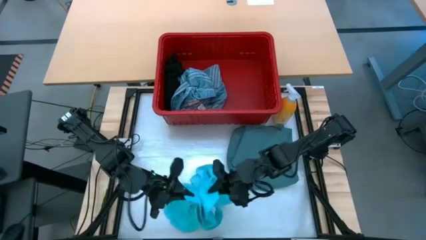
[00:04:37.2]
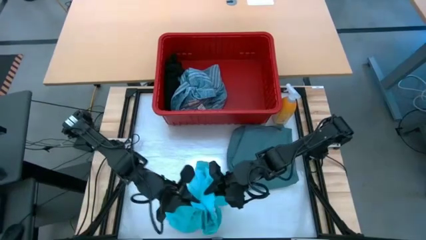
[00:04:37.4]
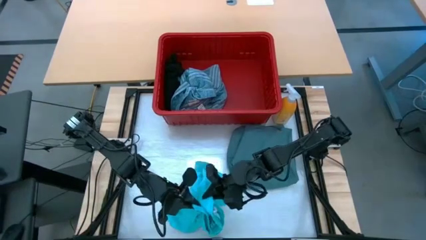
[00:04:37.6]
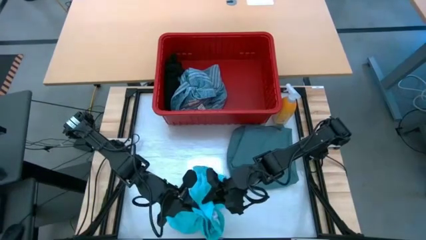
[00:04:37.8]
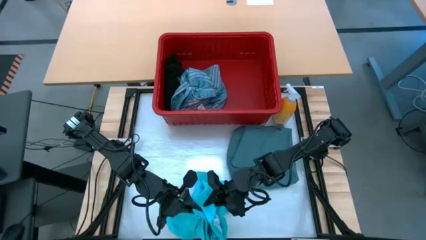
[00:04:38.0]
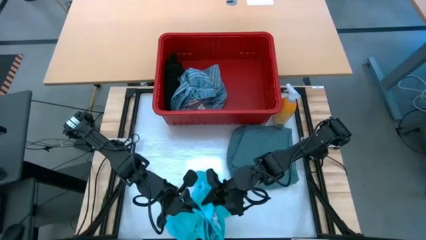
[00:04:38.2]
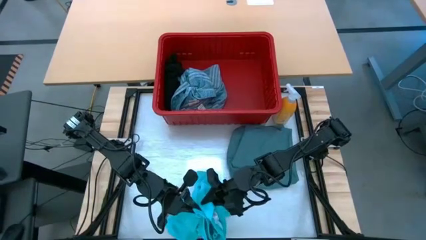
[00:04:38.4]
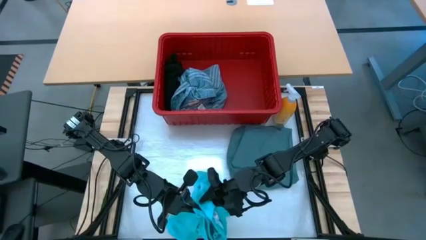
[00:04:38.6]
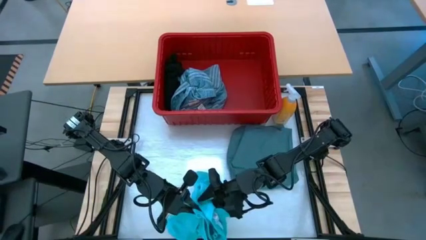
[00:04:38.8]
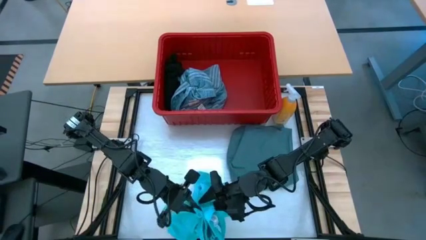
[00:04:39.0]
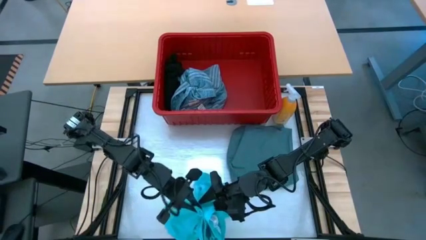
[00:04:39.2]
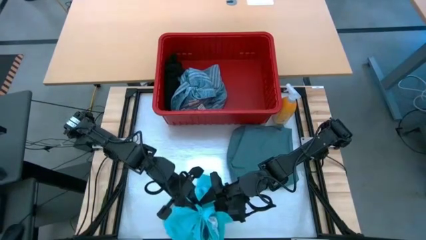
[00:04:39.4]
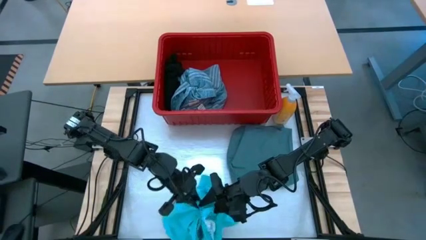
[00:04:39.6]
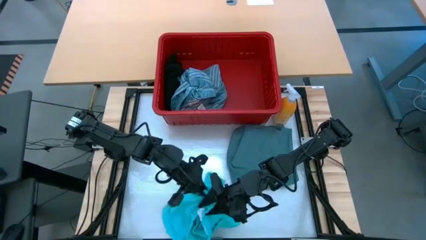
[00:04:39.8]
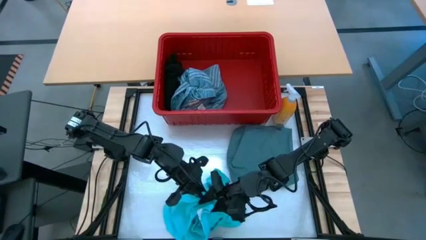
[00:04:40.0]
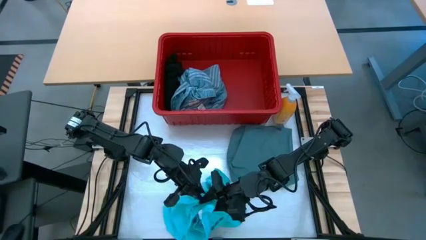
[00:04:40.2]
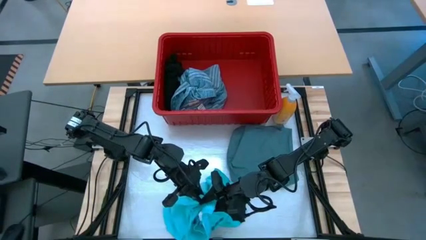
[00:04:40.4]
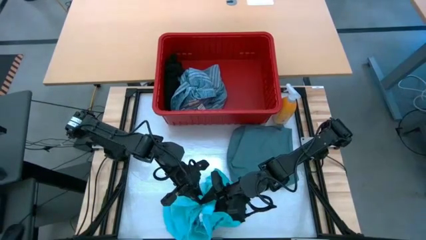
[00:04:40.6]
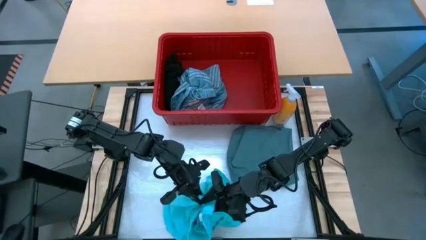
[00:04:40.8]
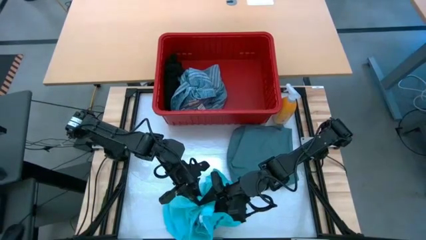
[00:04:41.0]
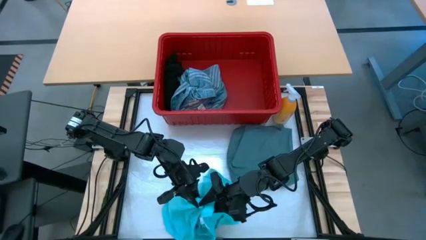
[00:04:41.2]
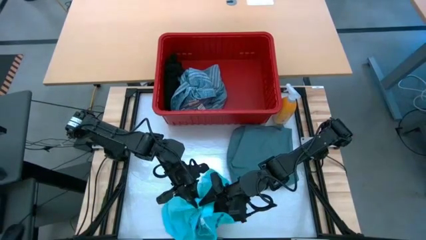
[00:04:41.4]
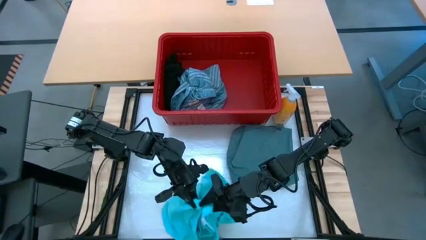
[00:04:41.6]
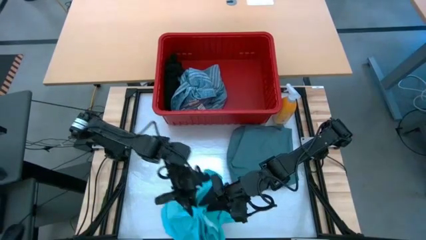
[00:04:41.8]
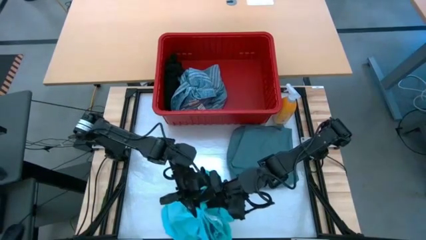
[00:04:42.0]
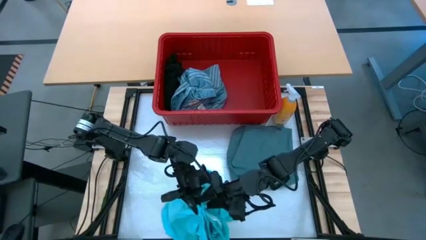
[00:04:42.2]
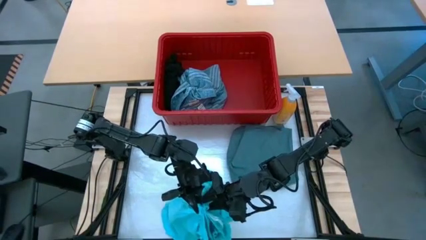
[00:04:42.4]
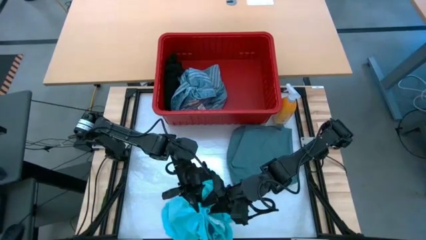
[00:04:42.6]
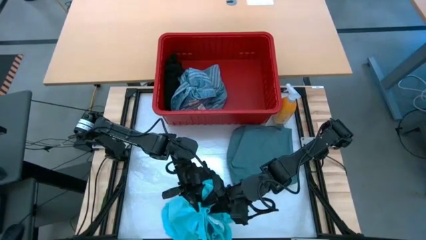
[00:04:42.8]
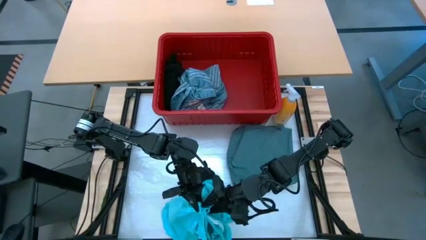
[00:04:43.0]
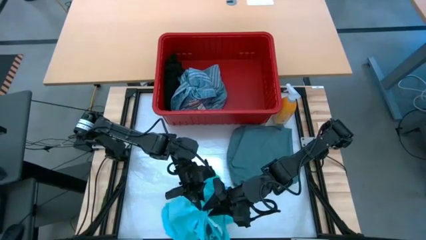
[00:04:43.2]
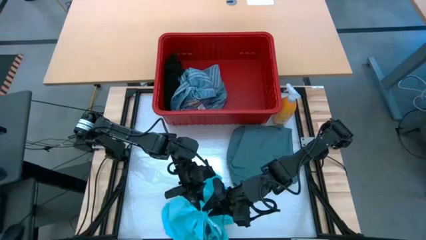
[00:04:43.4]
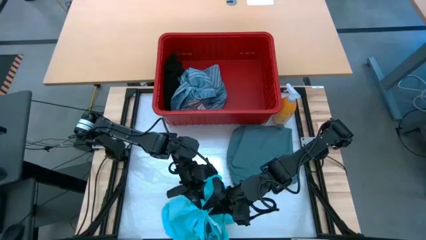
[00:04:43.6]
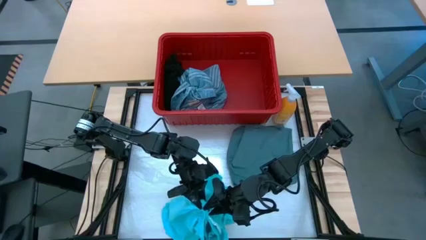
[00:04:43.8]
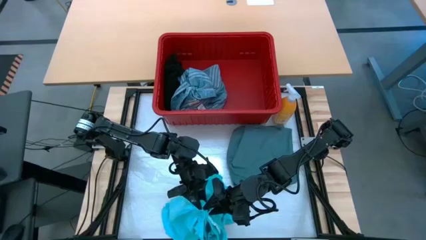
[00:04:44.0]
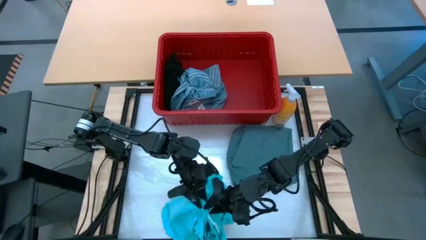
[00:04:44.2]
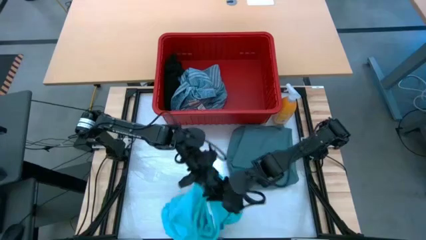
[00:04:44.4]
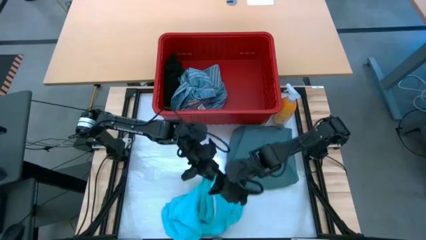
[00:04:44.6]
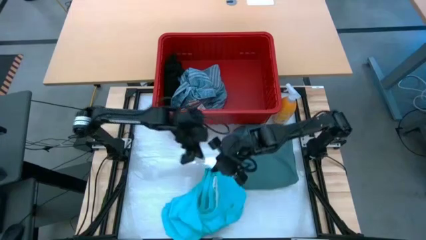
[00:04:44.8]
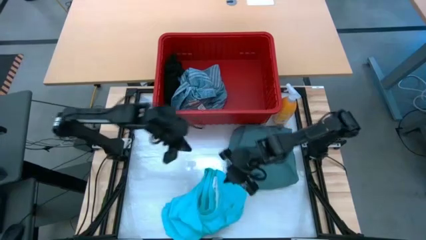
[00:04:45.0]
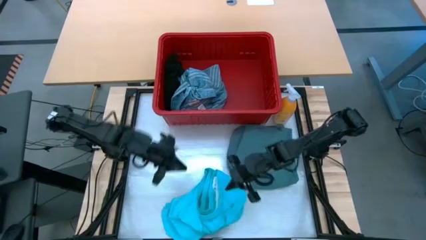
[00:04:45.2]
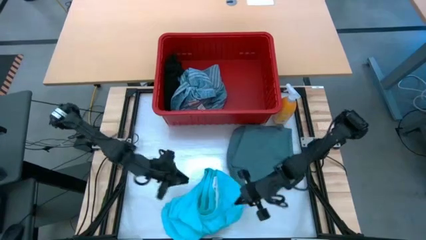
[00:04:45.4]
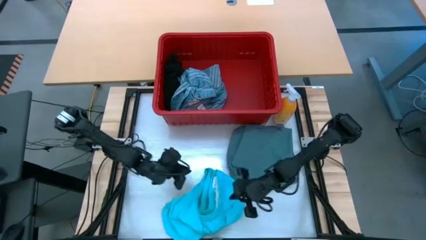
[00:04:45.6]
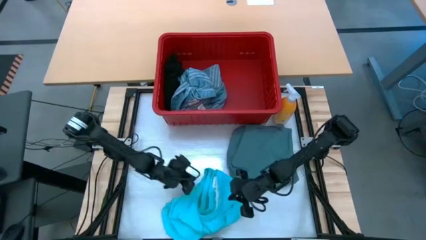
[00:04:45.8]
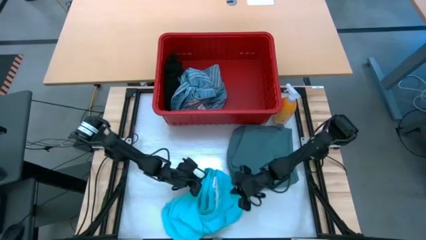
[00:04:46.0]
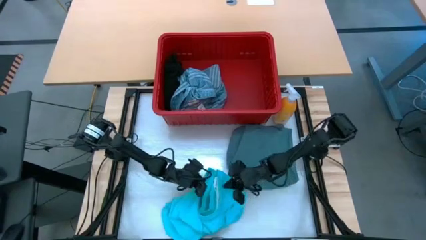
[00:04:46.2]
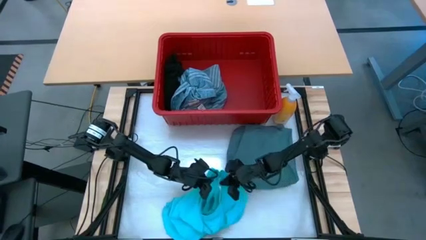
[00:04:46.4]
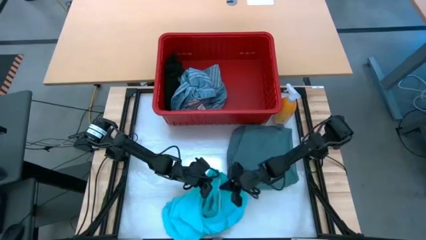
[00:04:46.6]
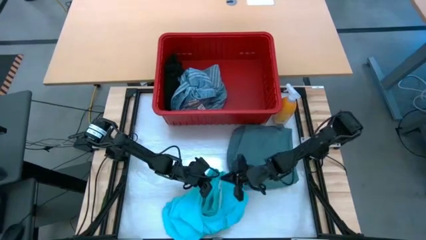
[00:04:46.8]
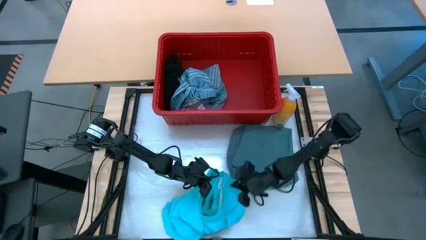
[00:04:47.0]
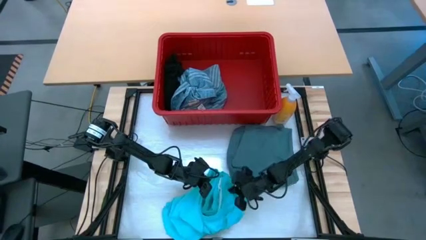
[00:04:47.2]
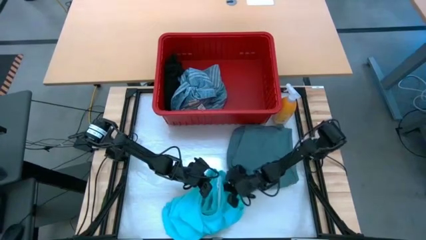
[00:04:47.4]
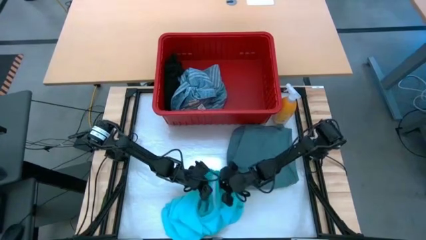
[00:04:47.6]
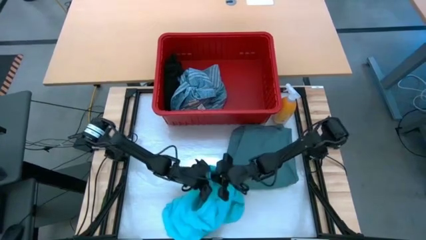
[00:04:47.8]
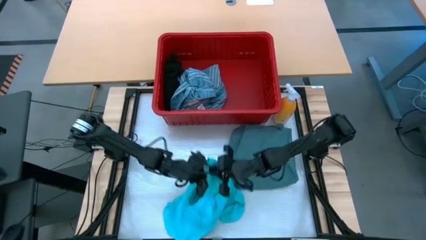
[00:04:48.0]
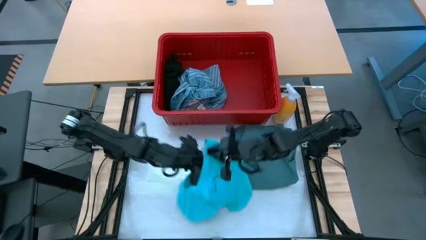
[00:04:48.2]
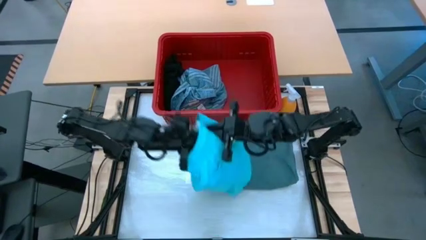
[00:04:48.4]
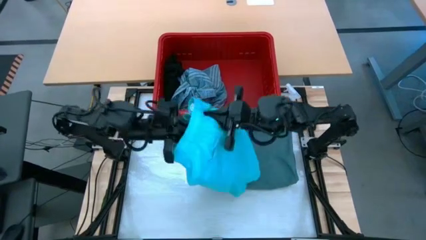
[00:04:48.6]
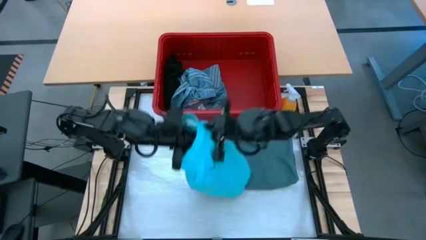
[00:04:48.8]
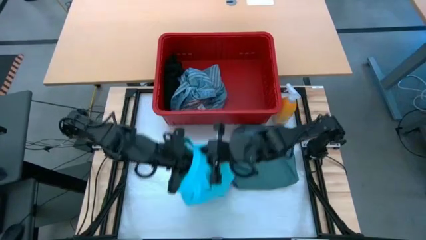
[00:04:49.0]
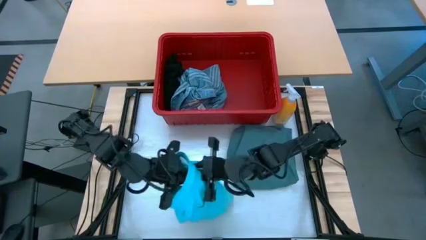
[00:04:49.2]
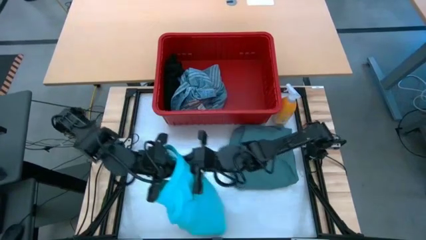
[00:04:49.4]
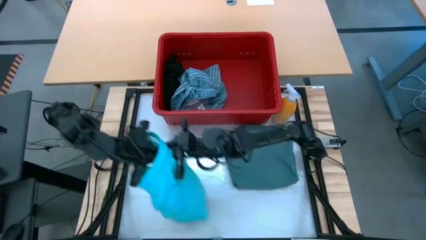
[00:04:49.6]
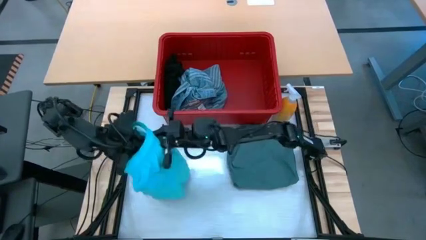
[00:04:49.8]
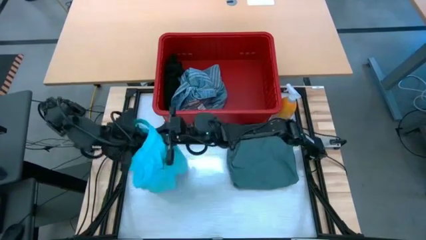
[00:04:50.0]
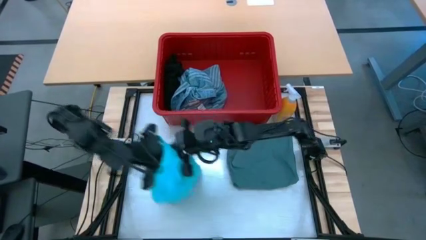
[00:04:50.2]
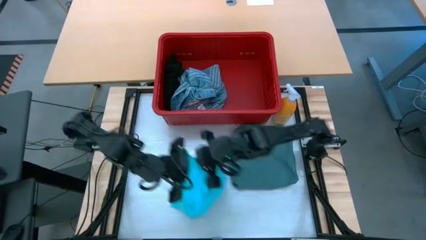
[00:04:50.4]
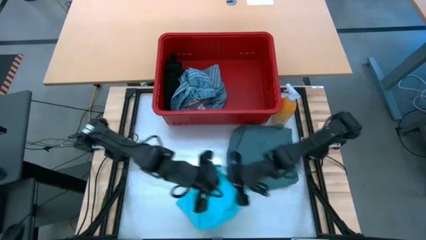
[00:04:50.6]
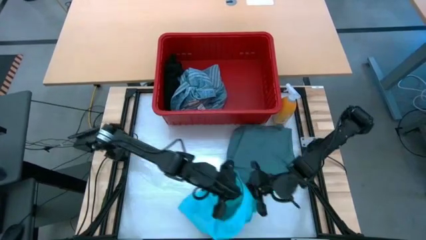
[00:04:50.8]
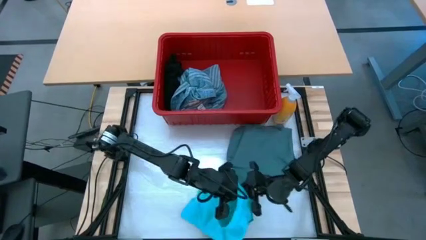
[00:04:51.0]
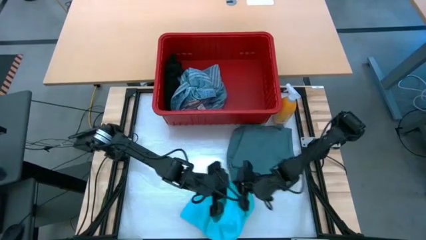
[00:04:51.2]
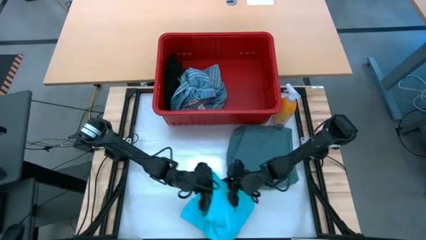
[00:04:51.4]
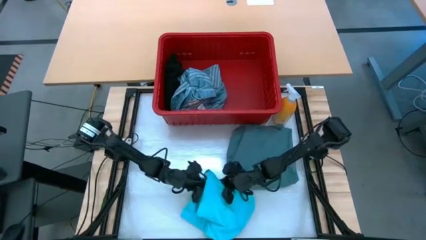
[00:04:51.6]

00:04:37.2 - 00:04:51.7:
Task: Fold Laundry from Bin
Fold the sky blue shorts
